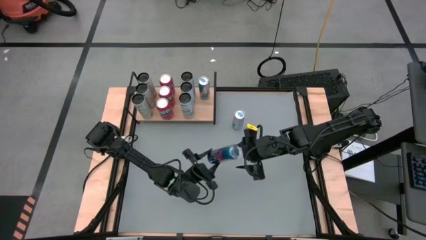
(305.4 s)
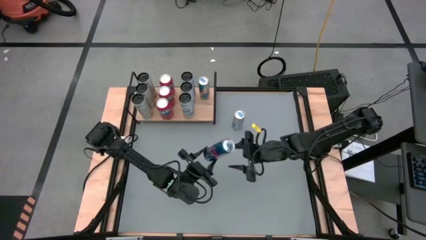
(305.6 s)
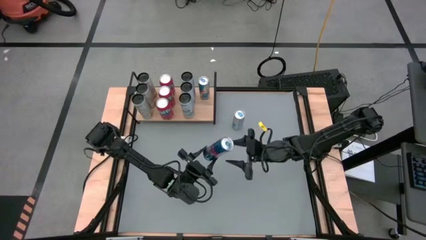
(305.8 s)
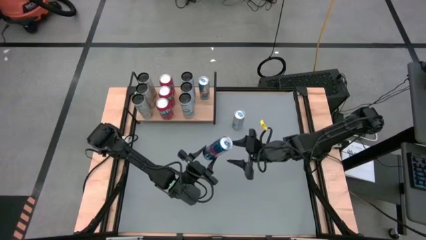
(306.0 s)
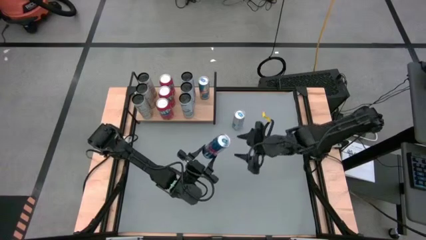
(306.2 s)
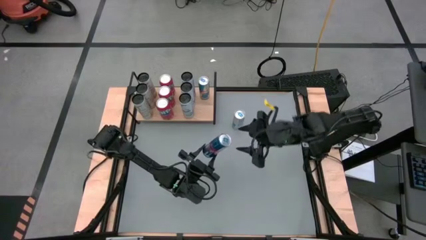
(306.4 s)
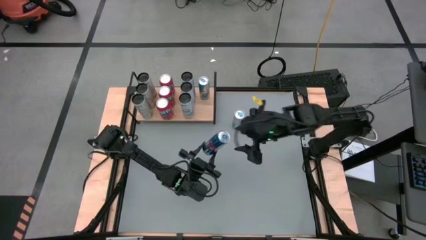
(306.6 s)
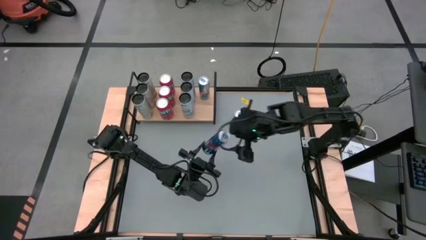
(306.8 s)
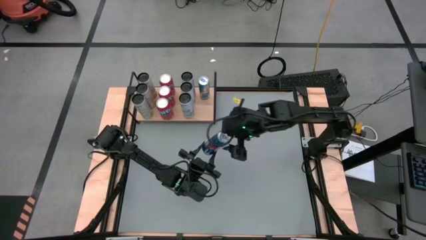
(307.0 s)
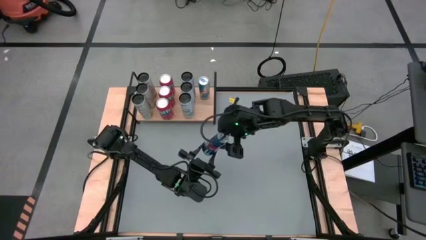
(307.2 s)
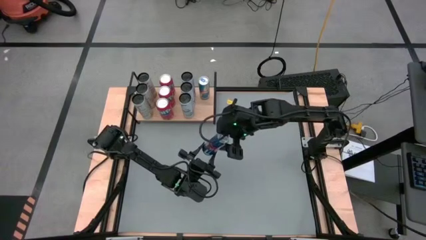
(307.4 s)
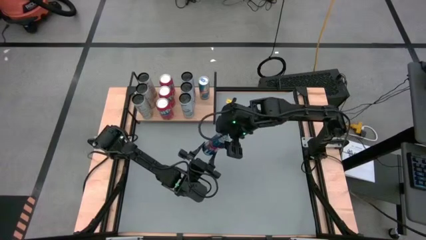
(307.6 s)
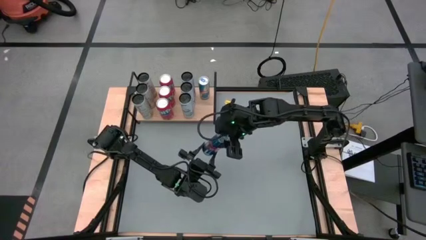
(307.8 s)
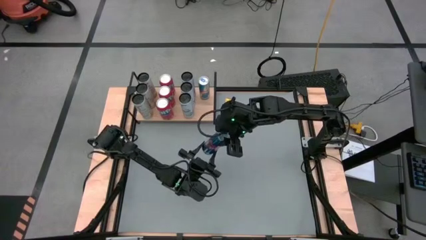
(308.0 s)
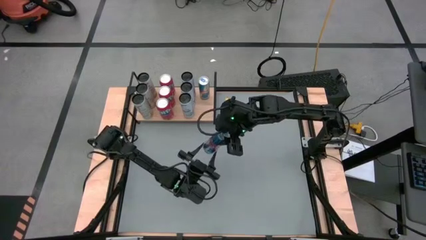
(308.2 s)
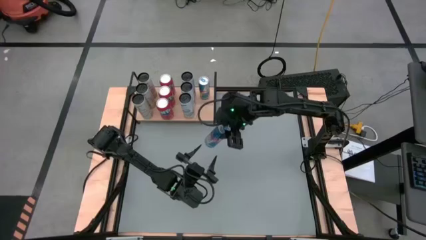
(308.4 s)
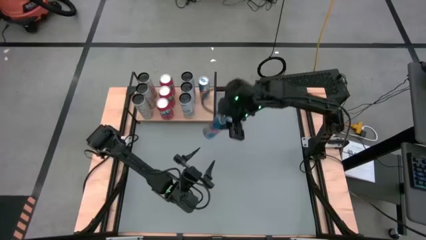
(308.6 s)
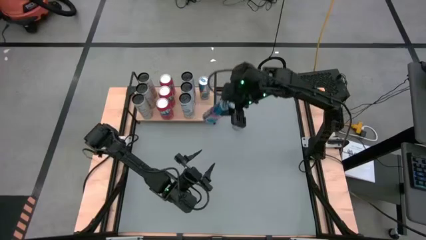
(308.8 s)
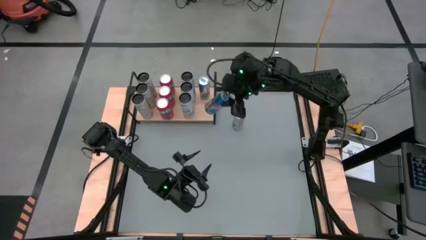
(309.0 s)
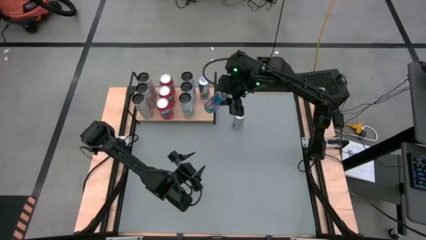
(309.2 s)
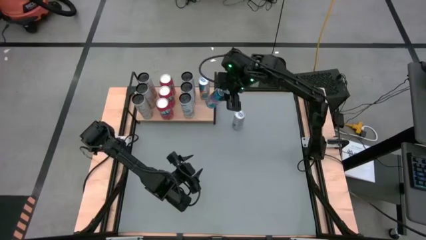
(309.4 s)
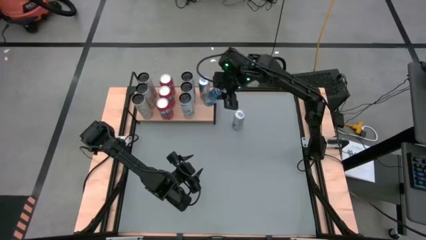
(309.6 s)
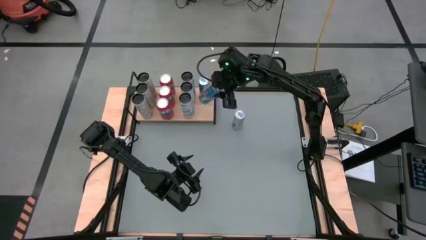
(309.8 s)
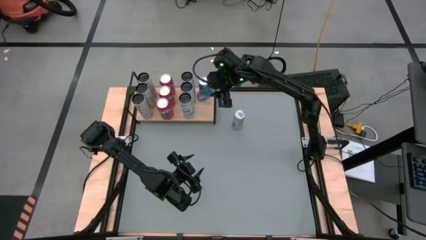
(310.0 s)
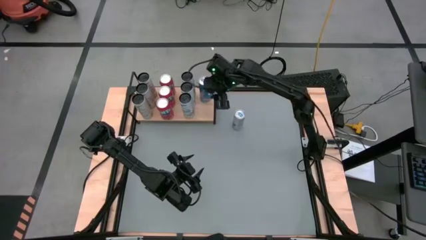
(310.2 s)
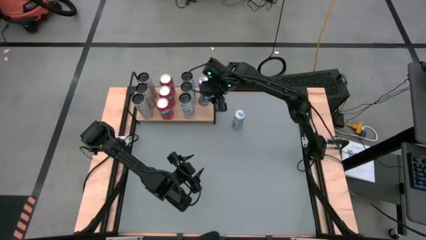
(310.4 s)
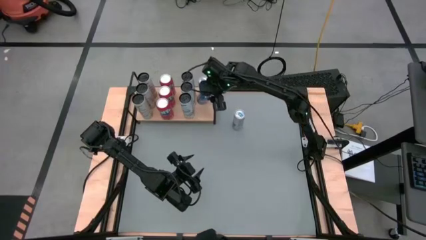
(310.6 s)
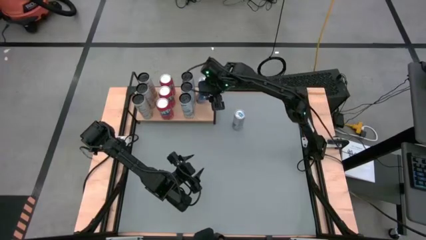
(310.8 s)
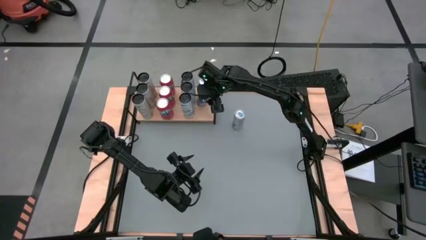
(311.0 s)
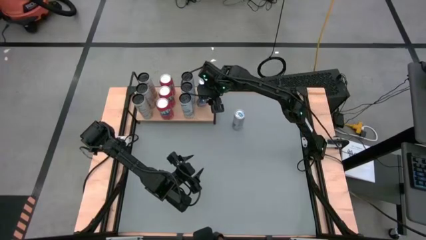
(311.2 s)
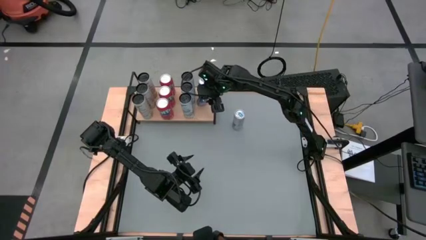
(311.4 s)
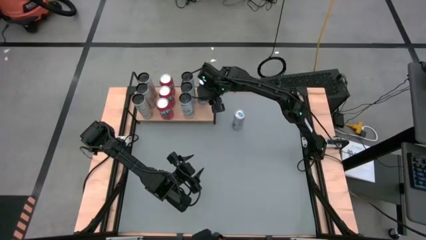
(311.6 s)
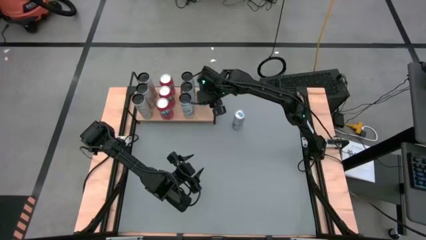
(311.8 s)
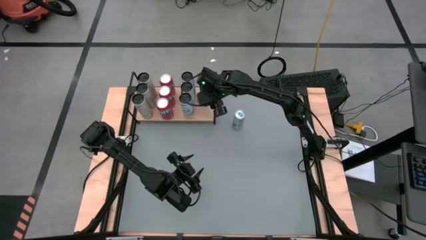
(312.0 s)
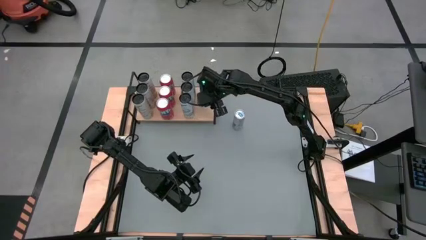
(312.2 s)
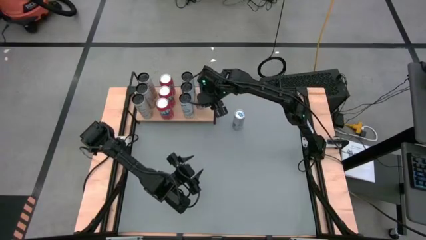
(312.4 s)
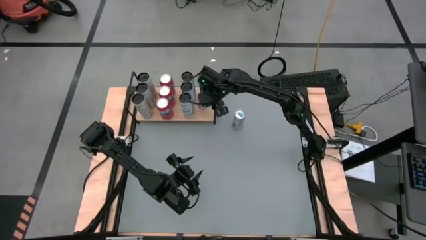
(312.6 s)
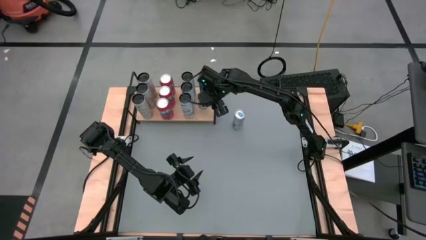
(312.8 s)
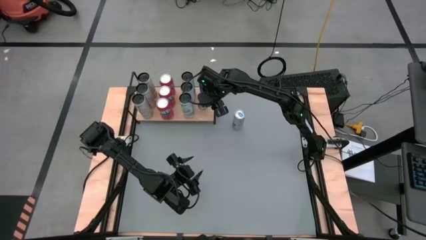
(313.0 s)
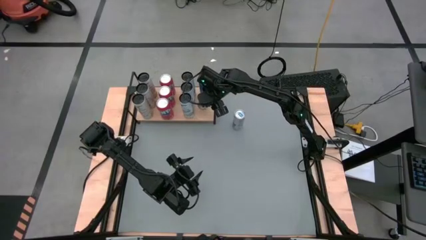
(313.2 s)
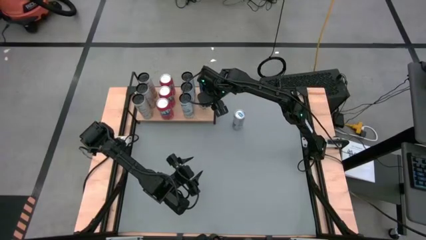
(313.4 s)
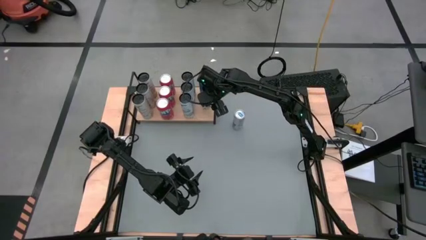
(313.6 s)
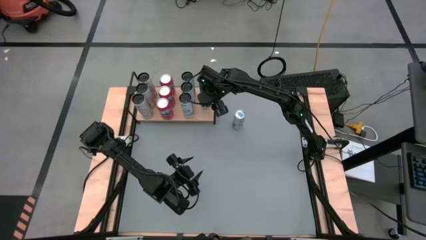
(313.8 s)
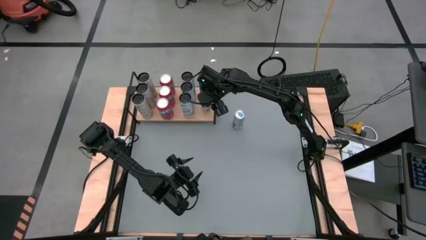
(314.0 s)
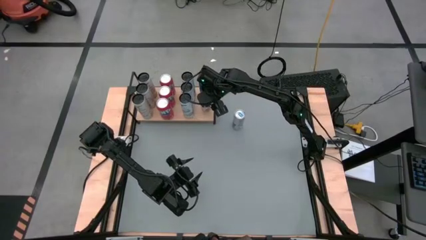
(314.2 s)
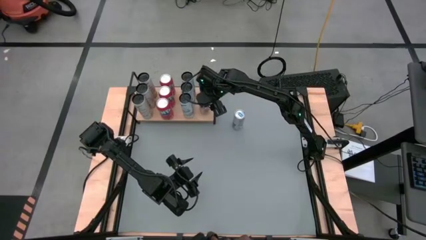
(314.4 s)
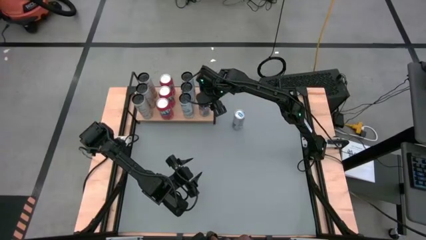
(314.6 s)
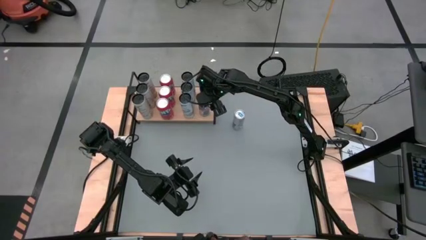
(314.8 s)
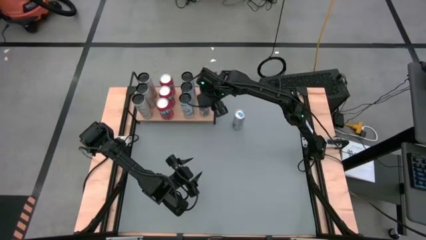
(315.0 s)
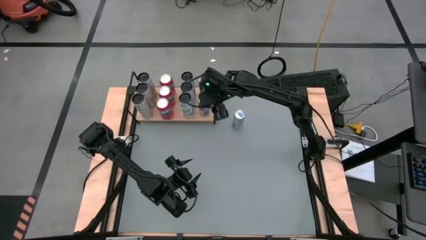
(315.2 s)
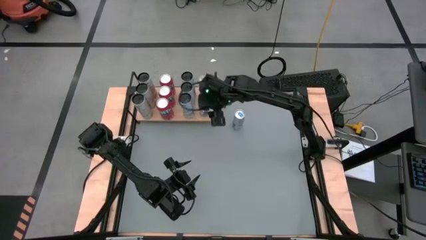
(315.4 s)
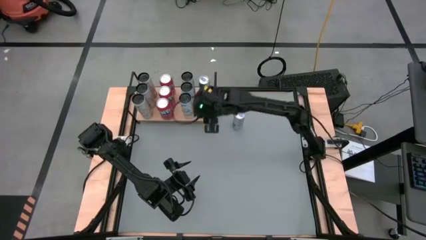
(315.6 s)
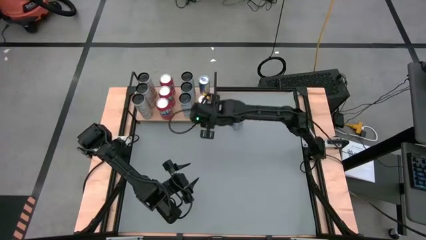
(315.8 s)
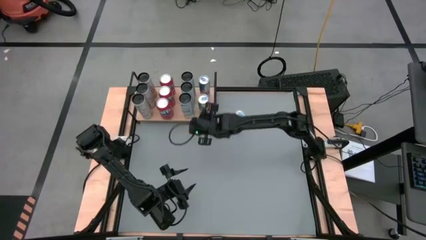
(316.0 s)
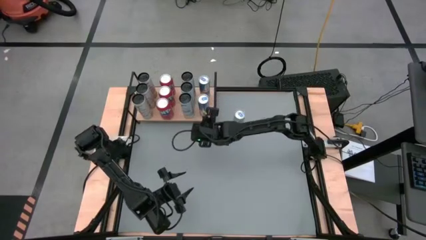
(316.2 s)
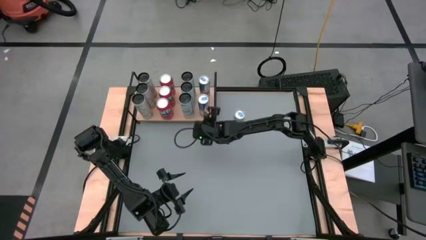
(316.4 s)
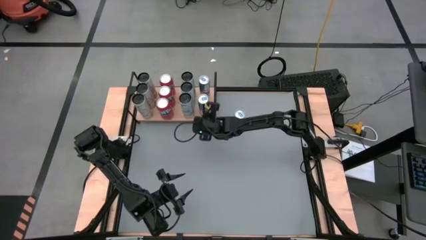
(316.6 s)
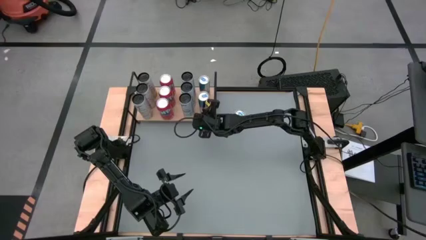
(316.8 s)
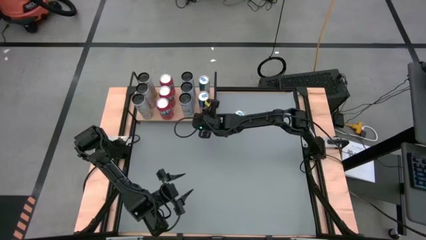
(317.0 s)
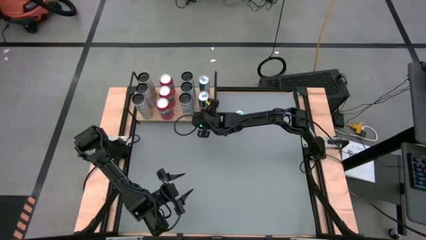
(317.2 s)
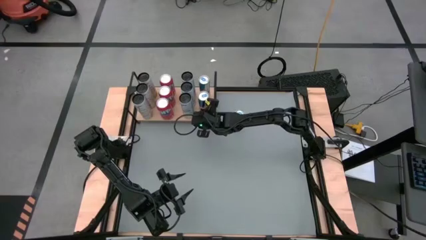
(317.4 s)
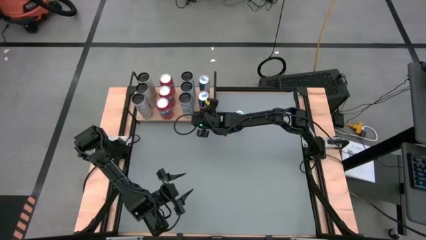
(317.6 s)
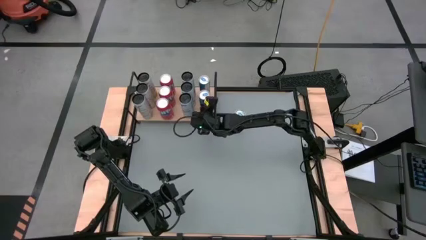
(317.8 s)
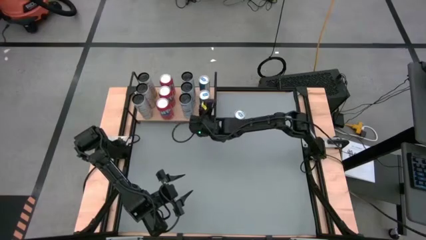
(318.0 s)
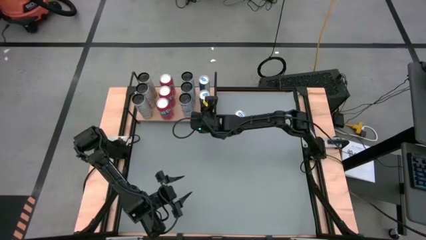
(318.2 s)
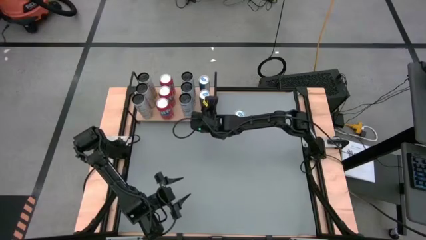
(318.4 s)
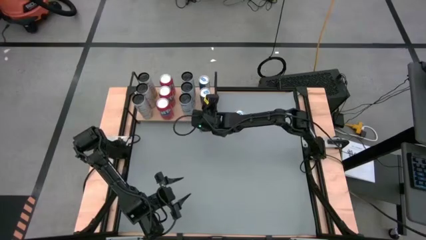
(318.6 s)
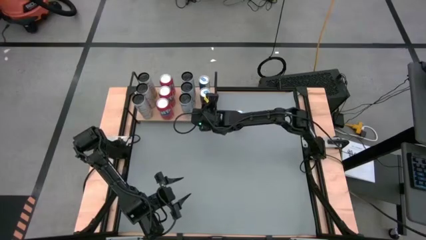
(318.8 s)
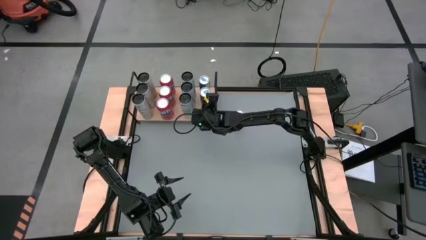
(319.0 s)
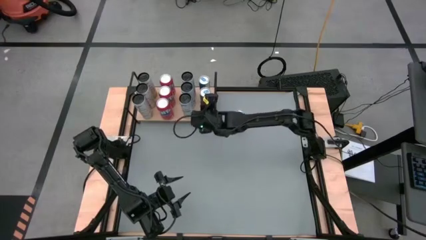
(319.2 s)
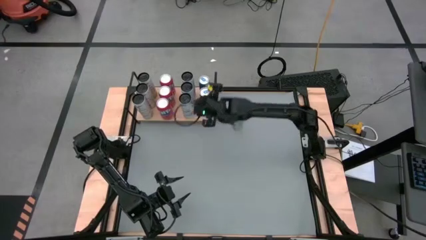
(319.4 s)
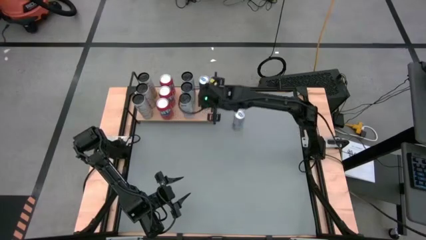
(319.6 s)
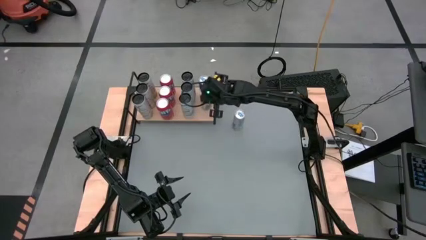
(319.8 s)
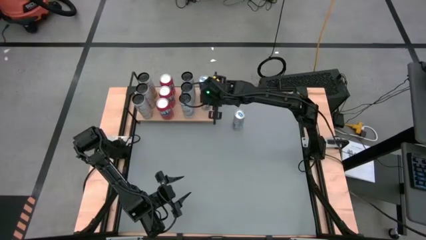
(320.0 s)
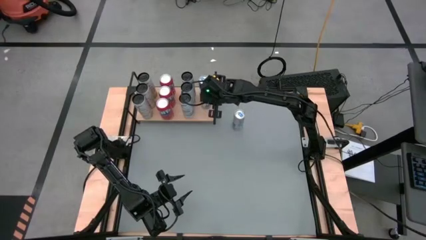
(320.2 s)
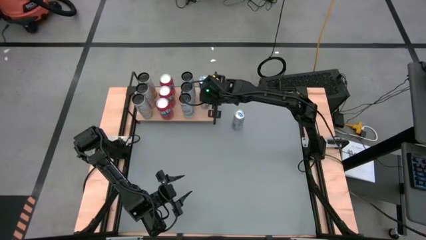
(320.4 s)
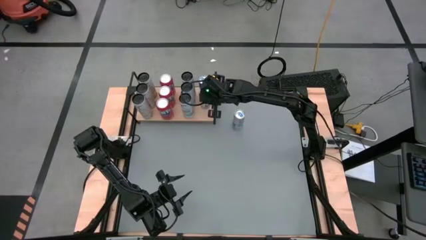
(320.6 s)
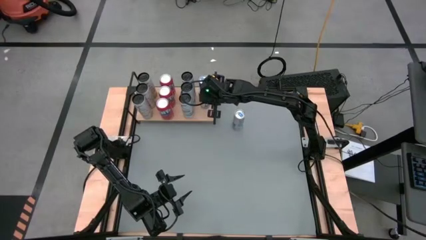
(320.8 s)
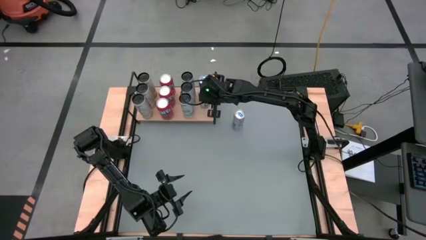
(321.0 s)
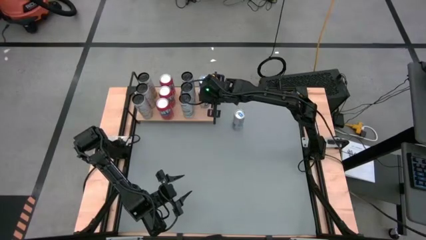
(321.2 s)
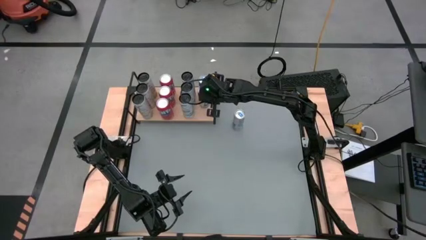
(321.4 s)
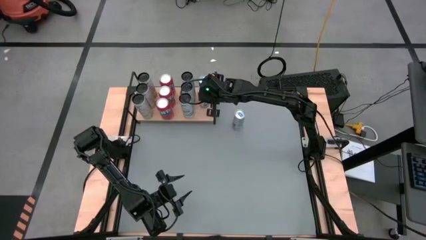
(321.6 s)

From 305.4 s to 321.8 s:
Task: Place canned beverage on shelf
Put the bottom blue soda can on the shelf aligned with the other blue soda can
